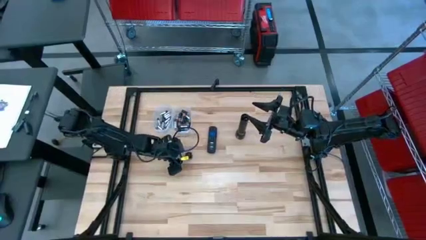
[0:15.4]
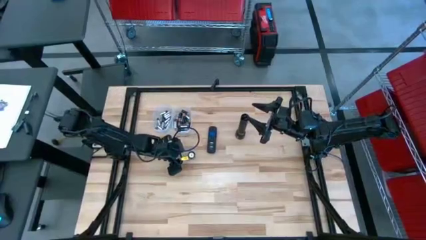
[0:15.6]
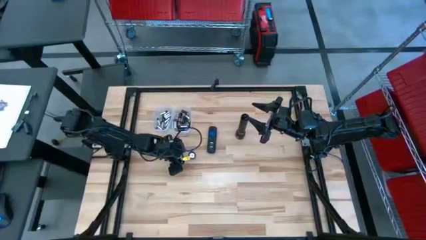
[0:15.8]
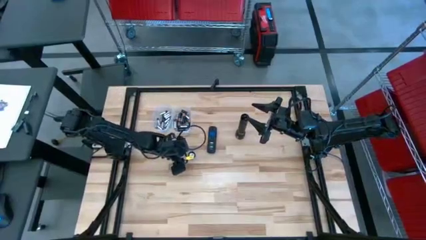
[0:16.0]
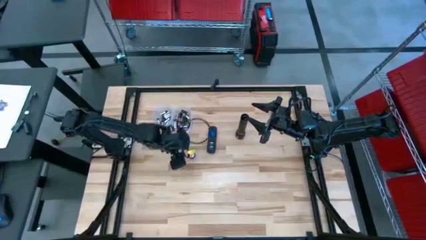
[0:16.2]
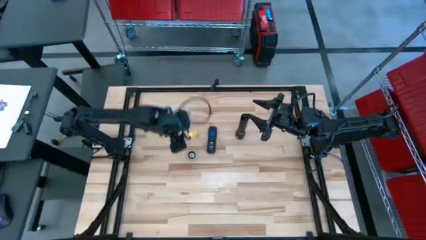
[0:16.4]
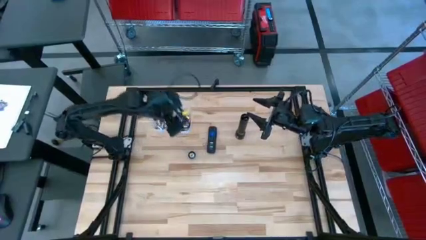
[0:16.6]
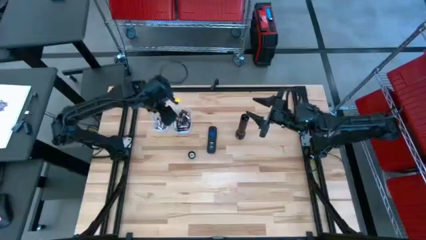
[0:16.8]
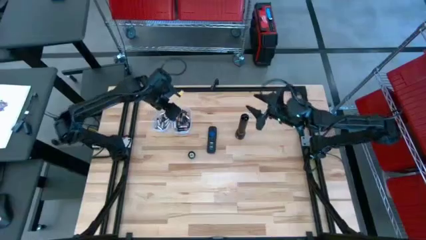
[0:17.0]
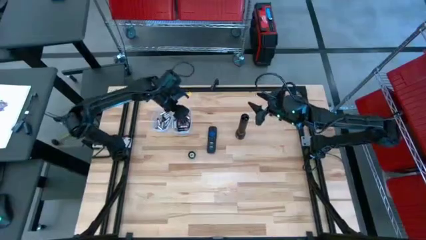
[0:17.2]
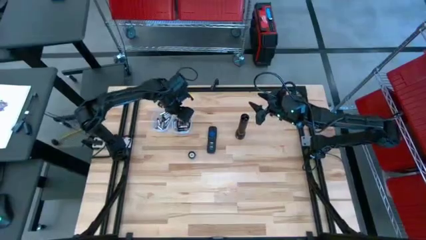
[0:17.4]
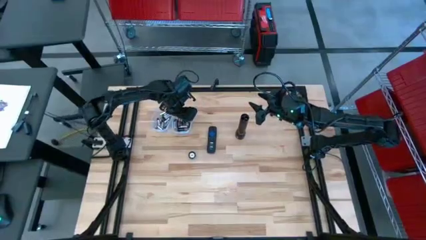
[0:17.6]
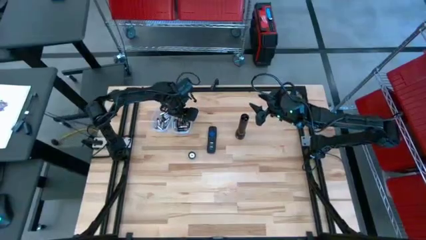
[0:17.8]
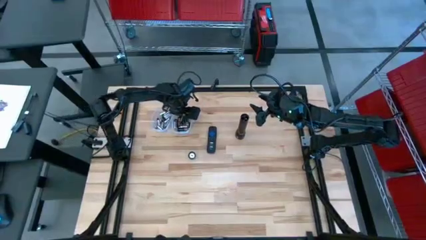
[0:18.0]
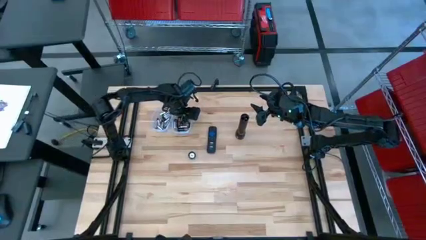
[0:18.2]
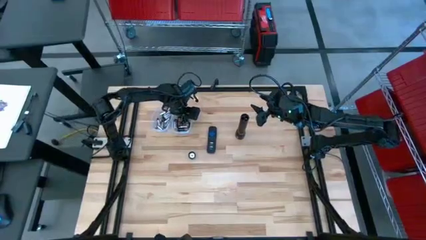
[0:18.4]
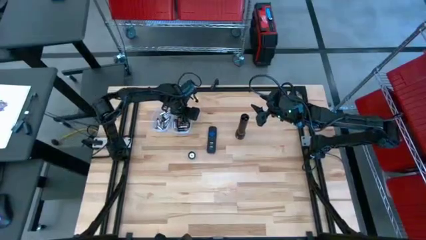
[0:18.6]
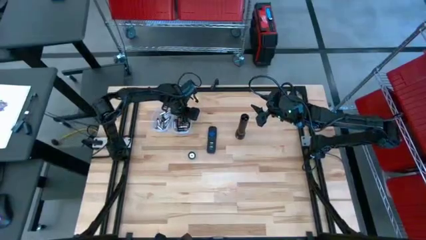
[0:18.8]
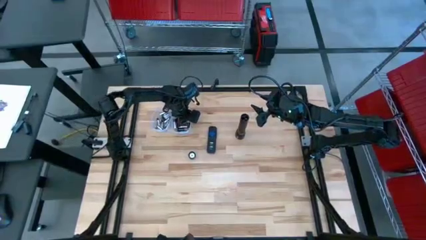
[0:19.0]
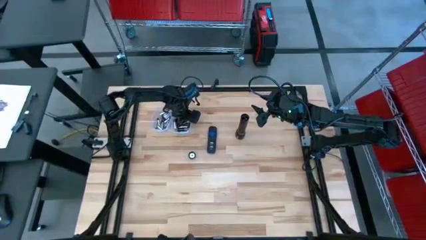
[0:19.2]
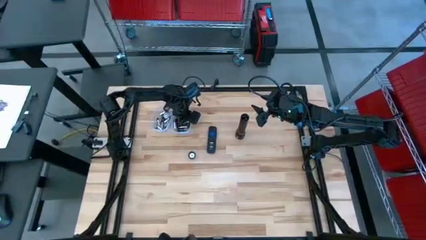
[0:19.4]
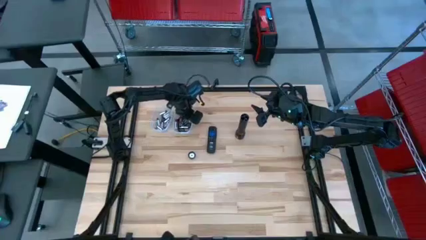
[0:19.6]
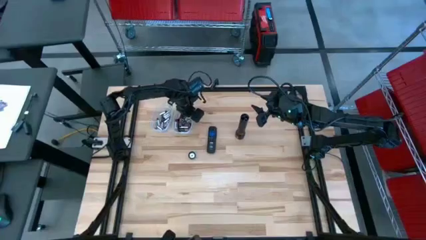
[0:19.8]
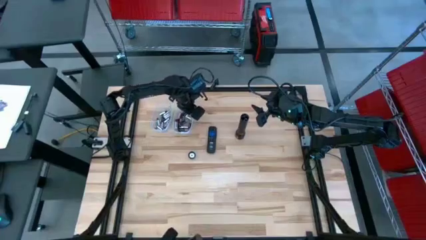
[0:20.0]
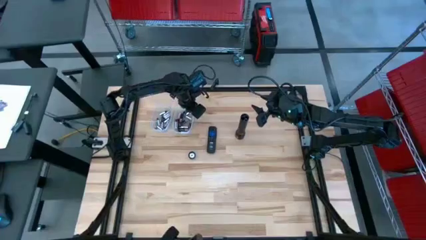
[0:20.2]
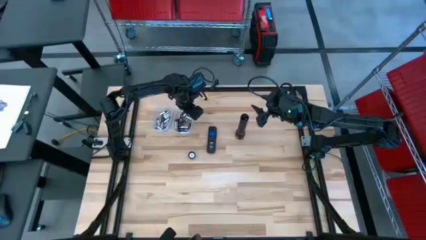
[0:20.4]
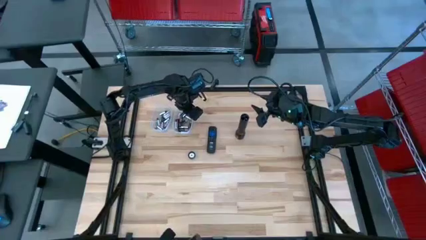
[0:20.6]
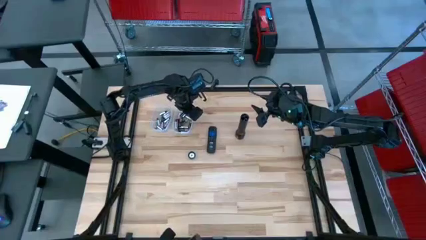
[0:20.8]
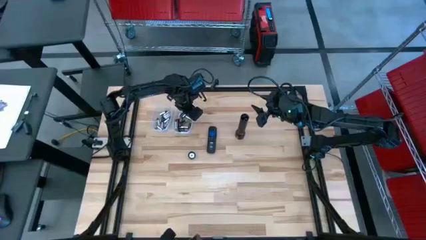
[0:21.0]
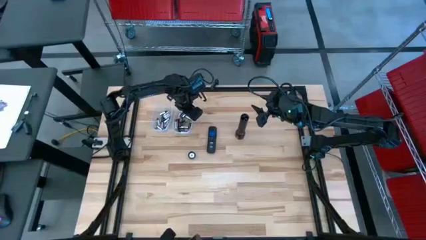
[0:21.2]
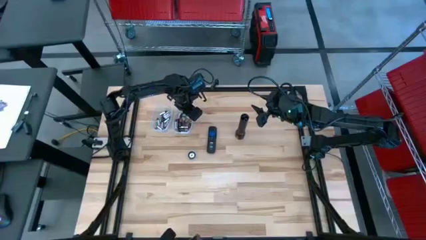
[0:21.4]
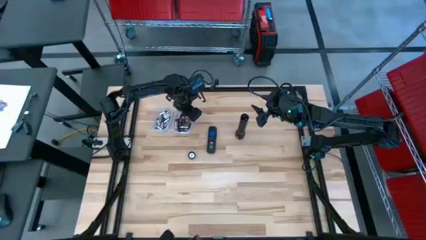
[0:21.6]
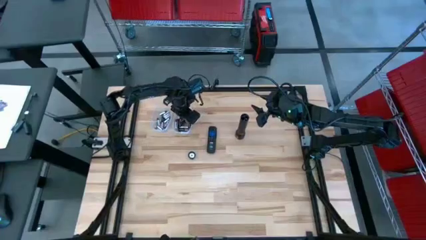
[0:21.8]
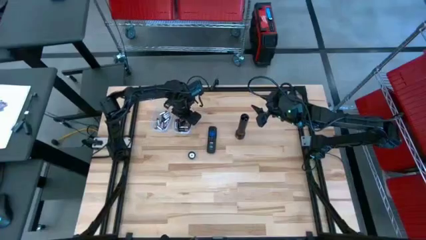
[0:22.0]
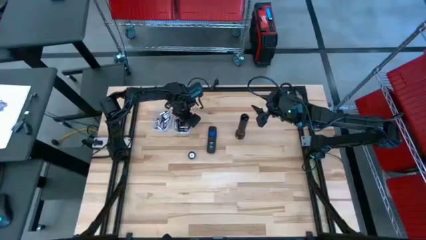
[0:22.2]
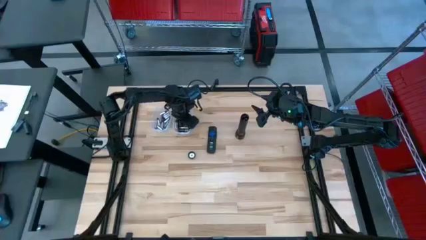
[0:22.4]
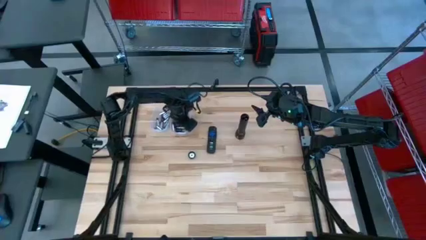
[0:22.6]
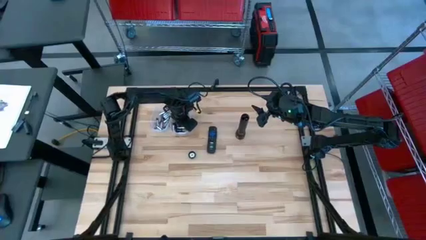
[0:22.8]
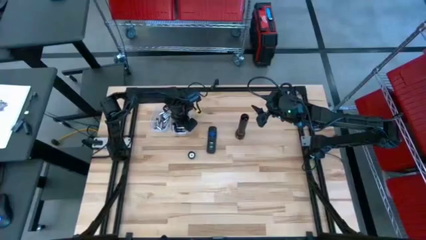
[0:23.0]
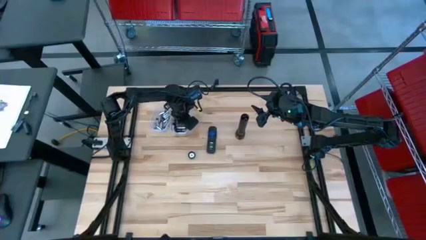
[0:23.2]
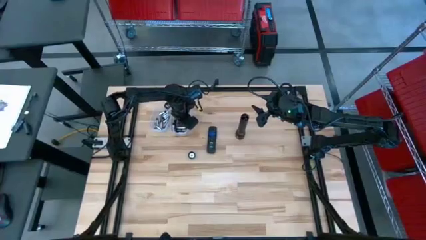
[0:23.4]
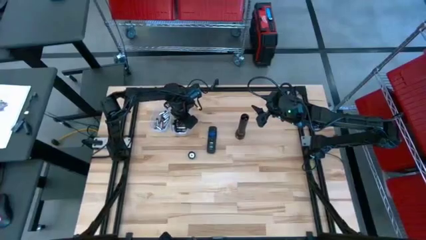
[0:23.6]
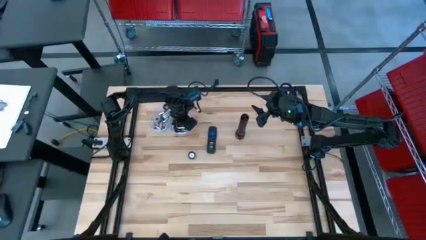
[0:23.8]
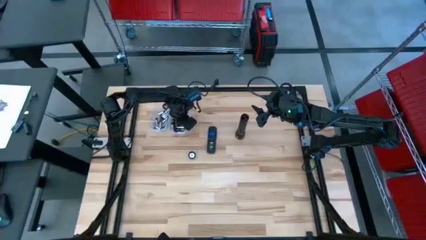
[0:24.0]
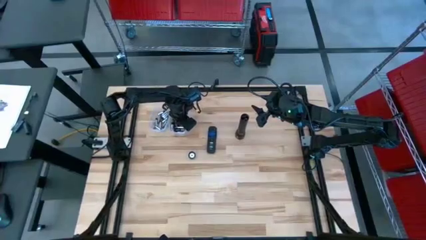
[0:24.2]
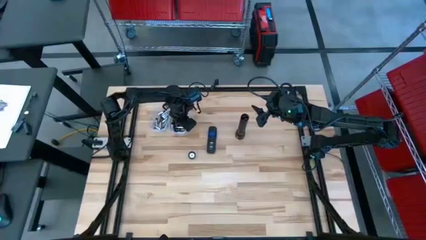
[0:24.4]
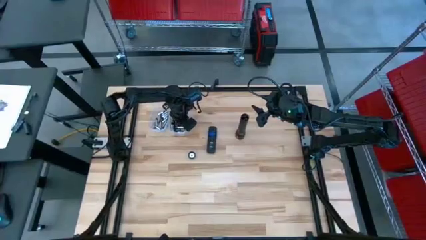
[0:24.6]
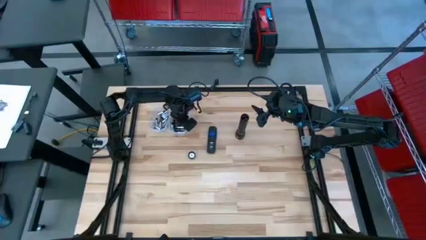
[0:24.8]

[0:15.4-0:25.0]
Task: Insert battery
Insert the brown battery into the flashlight battery compartment
